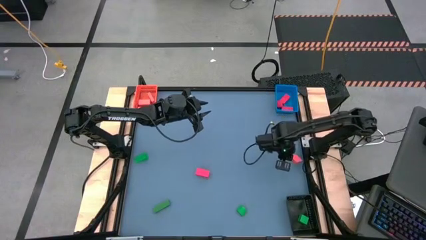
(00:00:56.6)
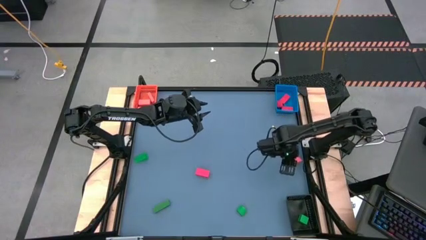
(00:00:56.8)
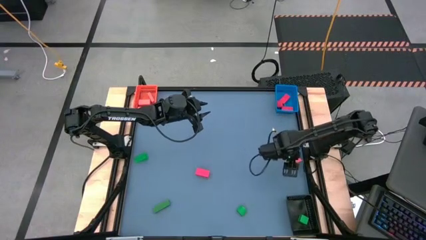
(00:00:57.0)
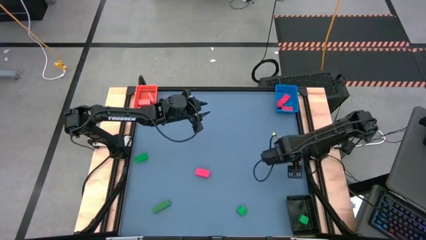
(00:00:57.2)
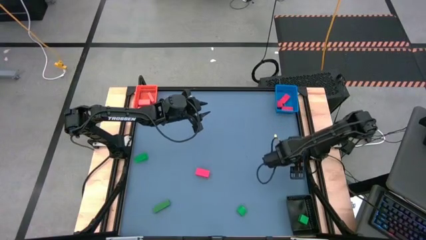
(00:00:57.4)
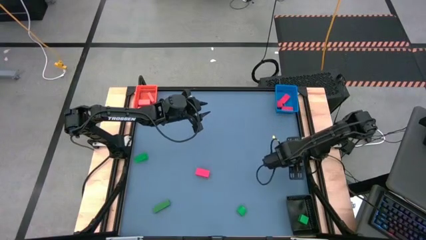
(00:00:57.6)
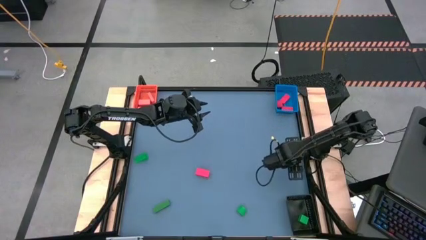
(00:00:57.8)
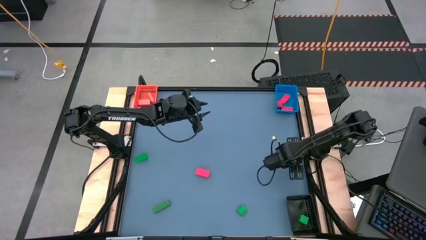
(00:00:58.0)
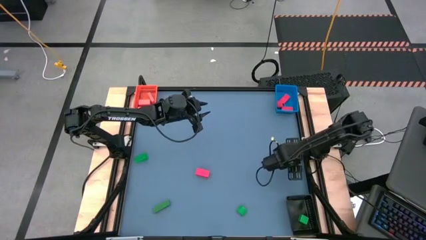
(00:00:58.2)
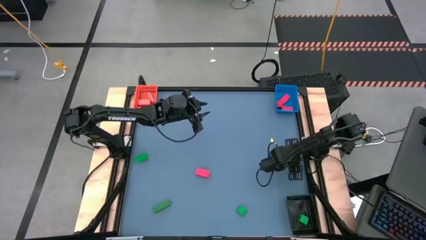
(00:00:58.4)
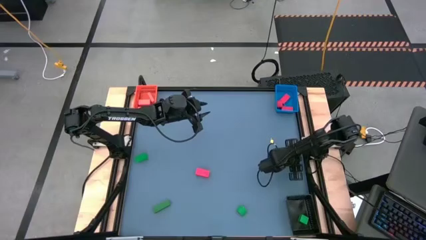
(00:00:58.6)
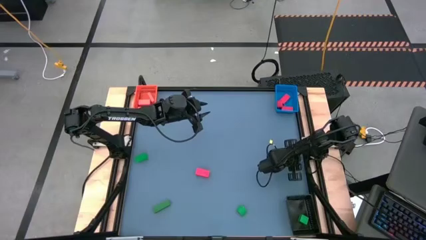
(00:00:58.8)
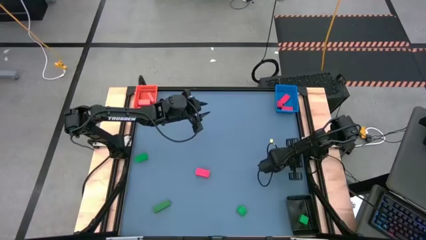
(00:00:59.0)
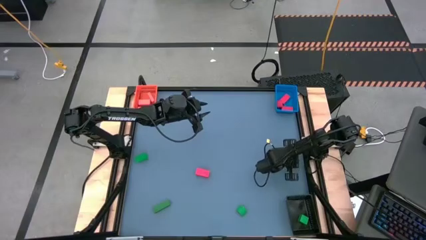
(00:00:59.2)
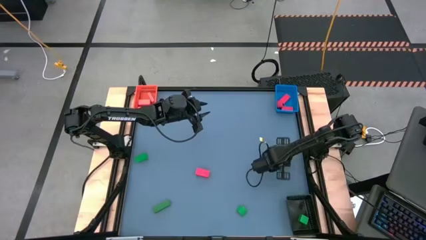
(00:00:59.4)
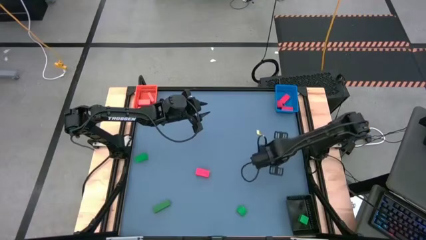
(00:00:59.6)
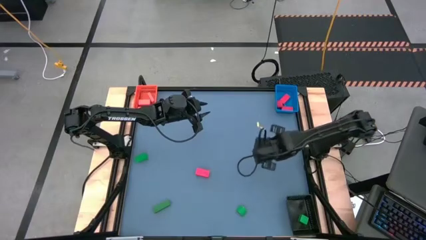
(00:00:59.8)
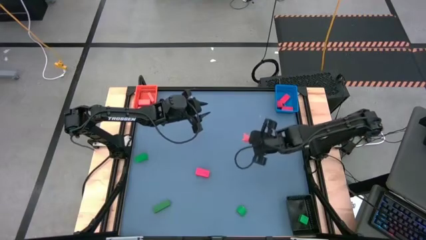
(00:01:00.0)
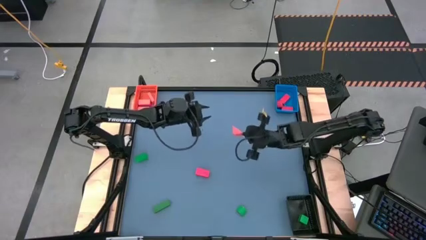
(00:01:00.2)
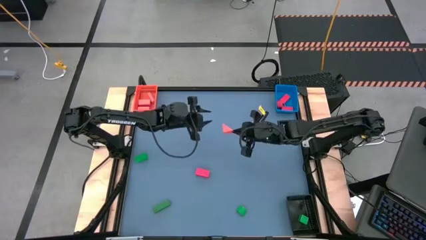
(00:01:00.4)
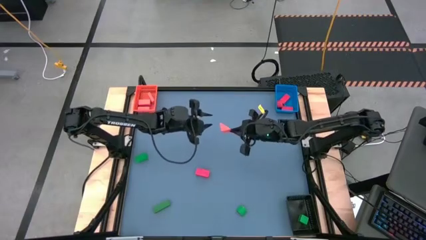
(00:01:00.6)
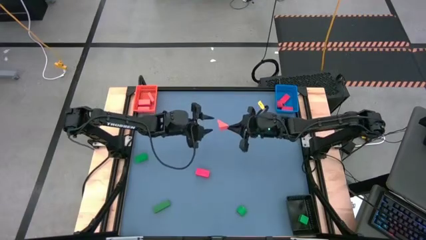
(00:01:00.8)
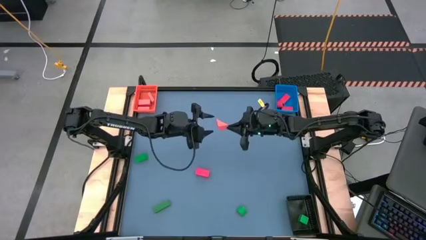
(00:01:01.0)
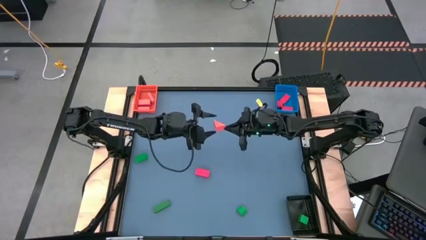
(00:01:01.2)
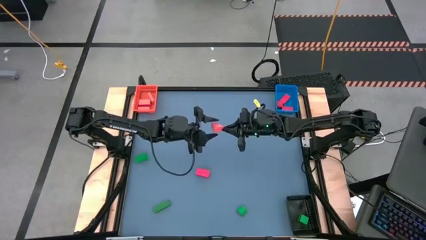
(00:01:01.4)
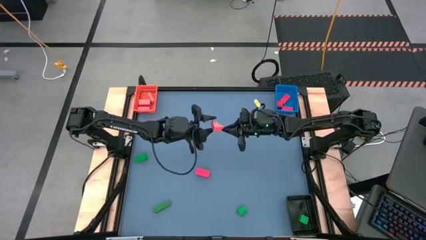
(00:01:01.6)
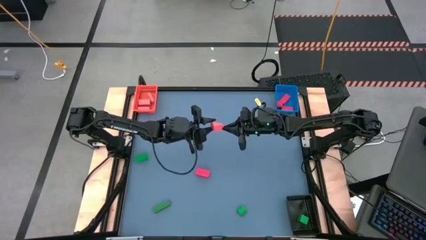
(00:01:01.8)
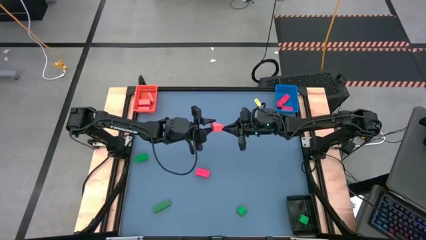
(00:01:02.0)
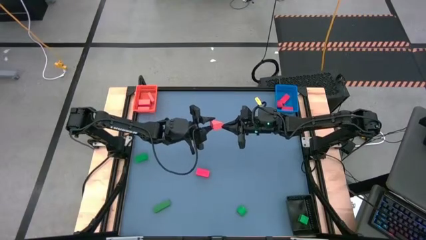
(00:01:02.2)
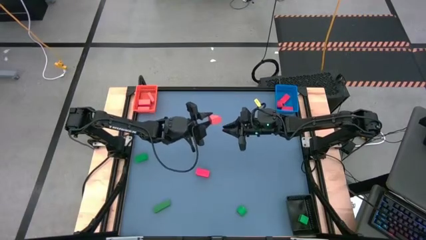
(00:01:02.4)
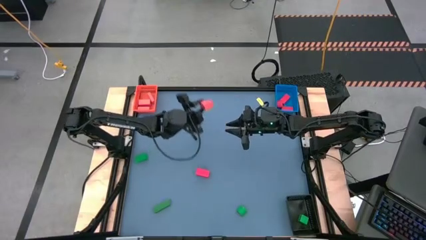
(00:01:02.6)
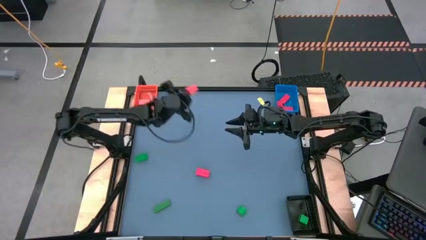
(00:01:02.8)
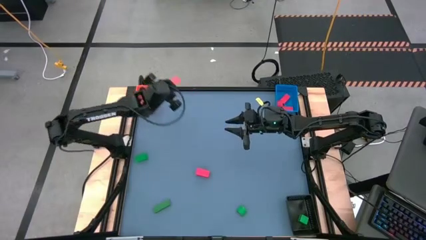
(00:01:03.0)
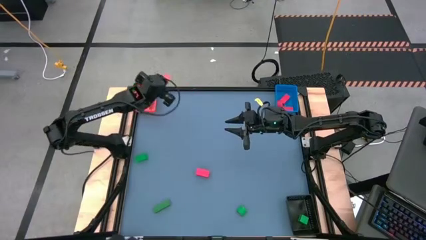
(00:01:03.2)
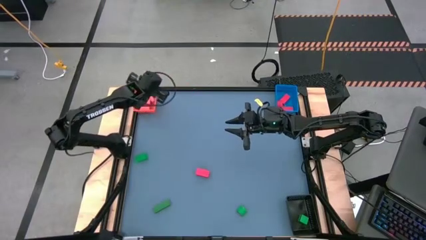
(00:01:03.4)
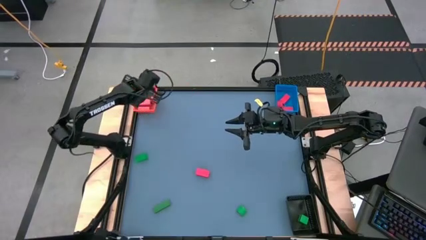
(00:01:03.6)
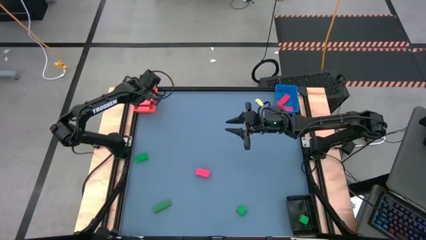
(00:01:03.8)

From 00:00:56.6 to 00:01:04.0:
Task: Sort & place blocks by color
Put the orange block into the orange bin

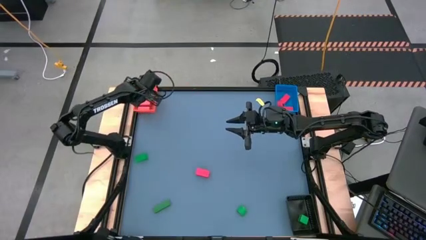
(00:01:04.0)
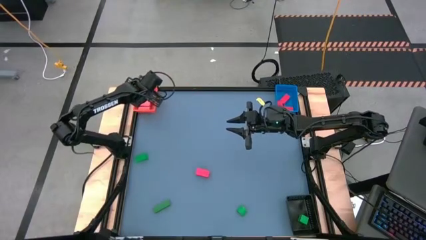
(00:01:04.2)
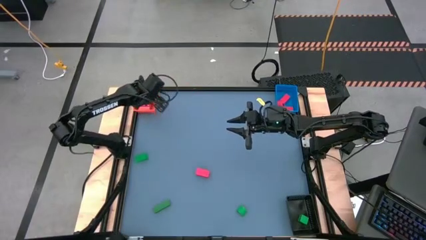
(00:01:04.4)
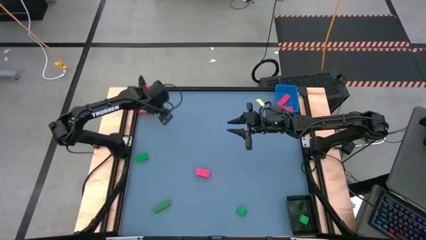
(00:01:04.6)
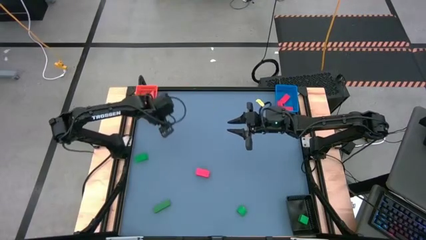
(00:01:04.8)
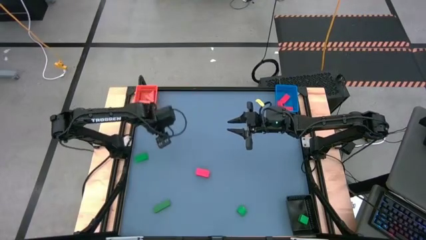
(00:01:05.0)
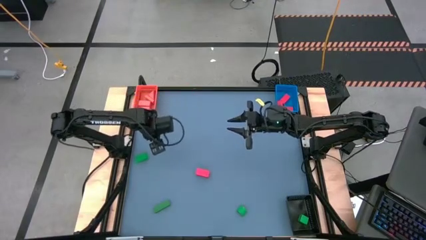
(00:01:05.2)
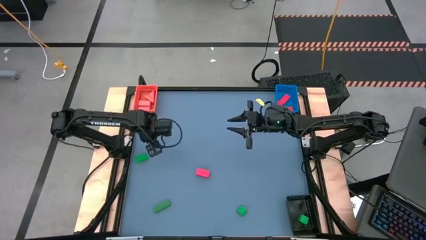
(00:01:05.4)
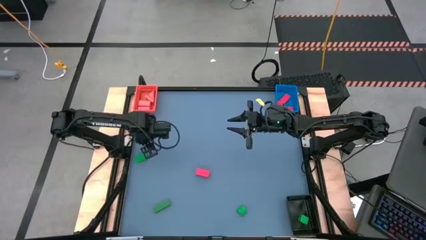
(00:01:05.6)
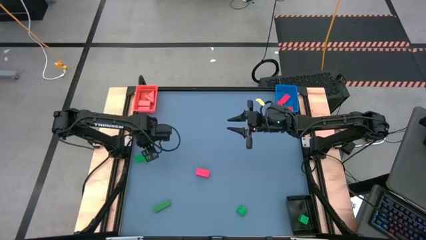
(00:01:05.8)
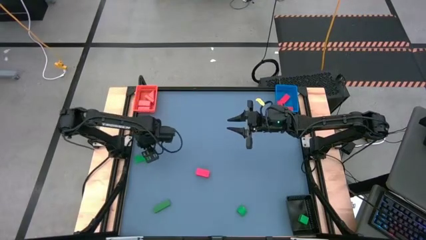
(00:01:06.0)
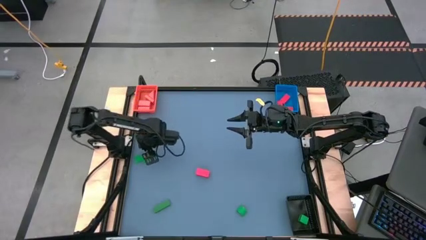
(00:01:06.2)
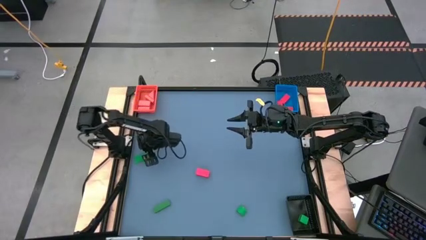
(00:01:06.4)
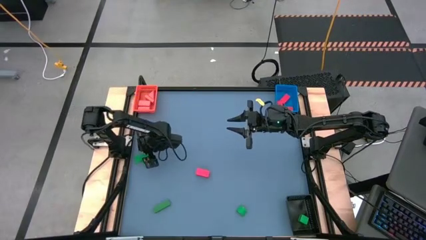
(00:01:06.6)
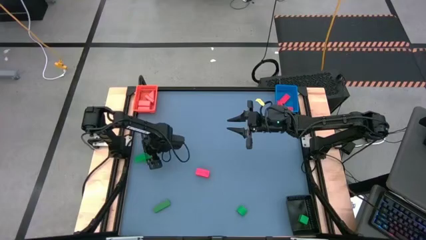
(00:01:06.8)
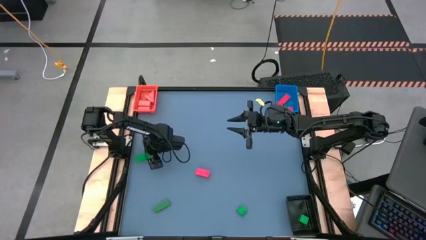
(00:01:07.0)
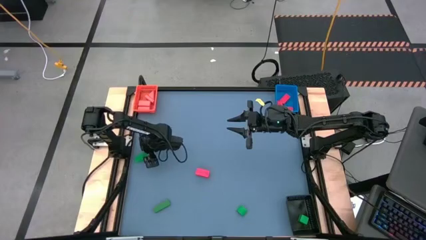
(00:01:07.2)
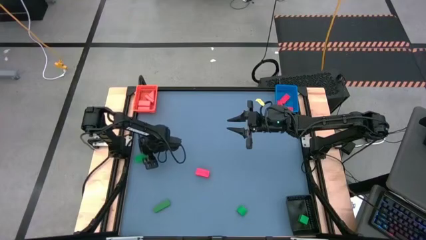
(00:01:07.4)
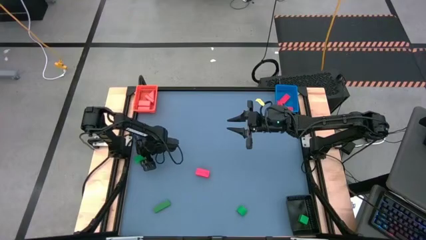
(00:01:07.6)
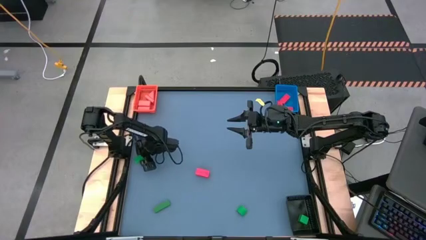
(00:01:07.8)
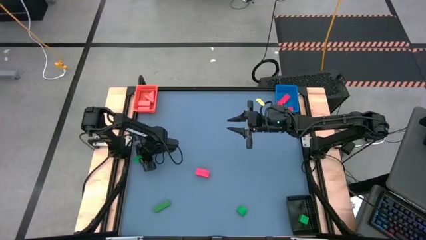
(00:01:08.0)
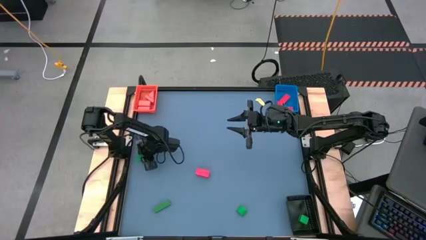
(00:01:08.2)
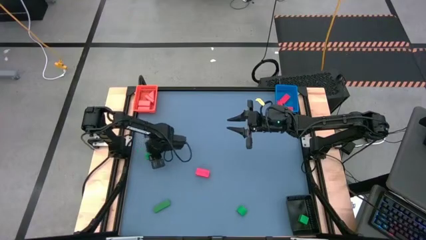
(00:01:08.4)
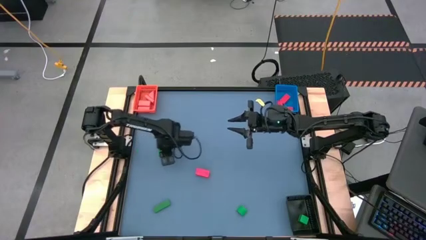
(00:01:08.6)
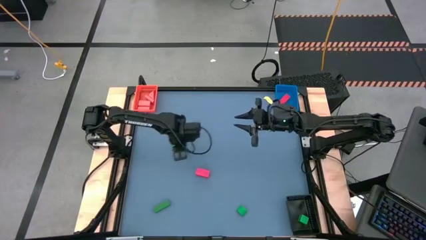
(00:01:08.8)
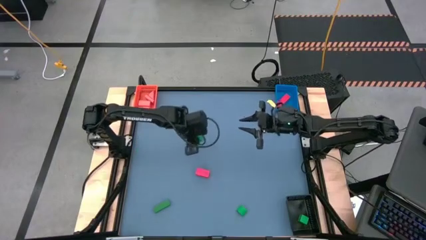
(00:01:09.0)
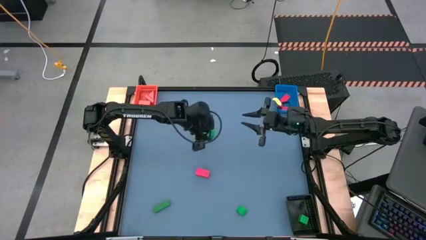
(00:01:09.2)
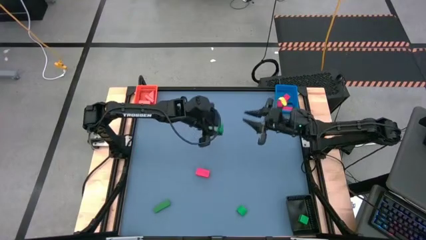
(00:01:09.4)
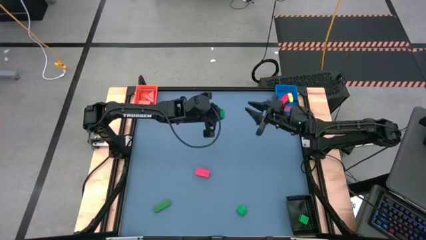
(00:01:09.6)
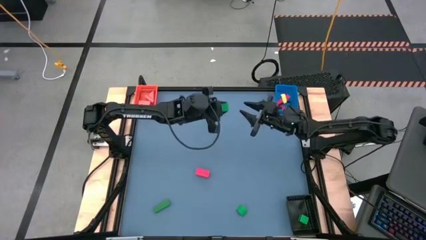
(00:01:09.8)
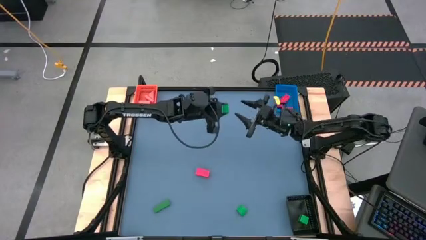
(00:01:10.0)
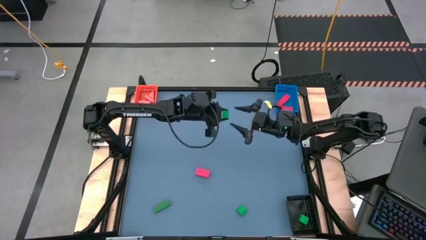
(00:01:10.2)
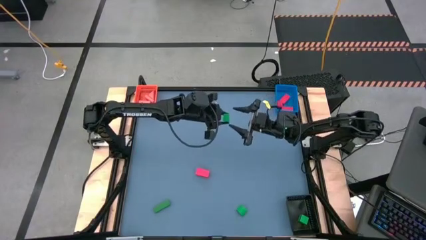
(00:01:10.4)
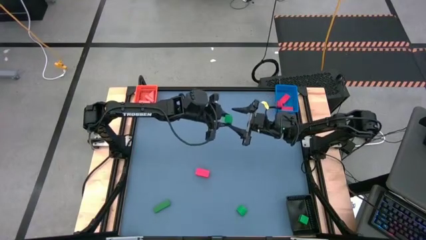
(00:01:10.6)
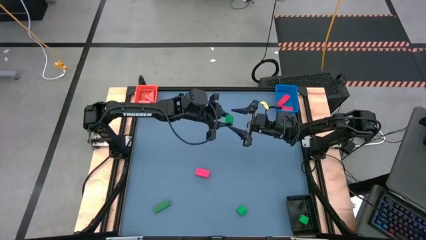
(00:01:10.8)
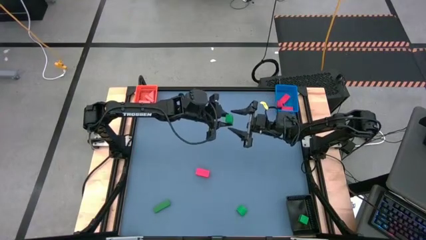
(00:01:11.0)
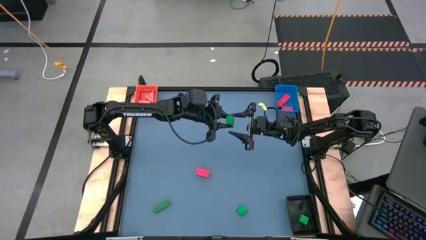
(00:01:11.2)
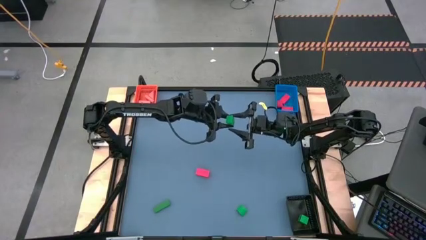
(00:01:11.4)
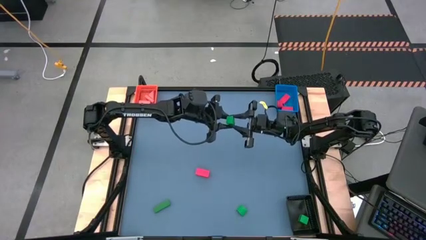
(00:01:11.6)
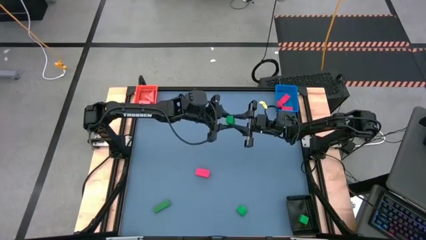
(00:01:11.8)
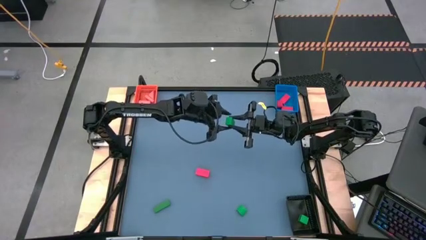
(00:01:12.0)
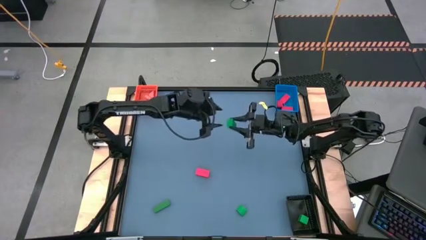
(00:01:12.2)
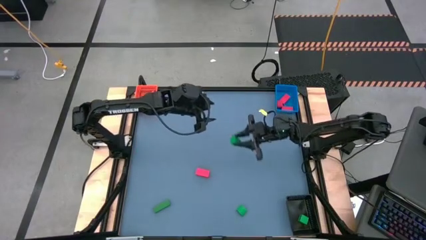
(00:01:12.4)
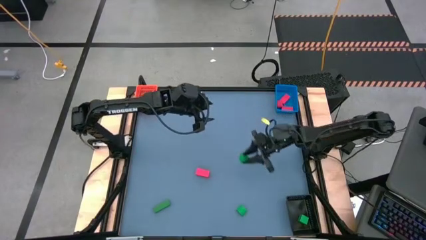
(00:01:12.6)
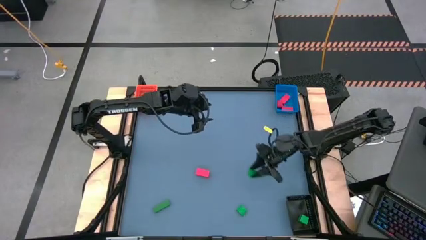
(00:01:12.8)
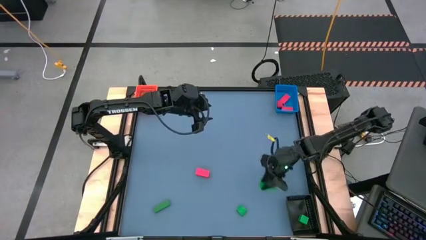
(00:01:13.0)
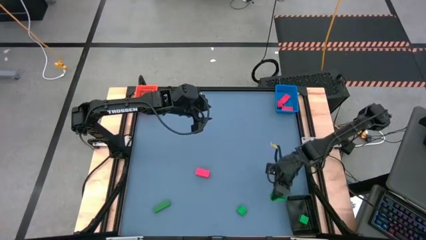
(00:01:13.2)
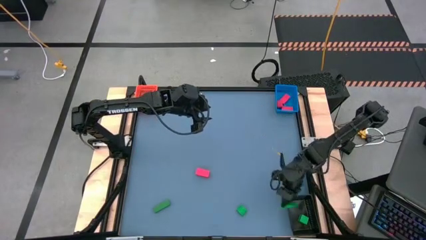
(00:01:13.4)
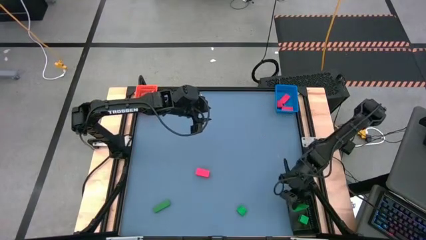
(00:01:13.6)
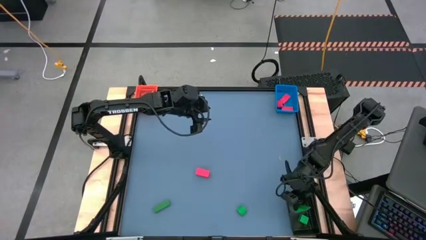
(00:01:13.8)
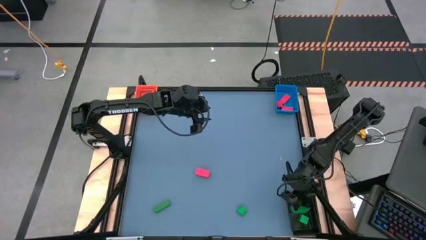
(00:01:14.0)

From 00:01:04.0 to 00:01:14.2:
Put the green block into the black bin
